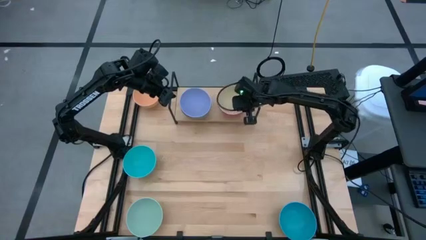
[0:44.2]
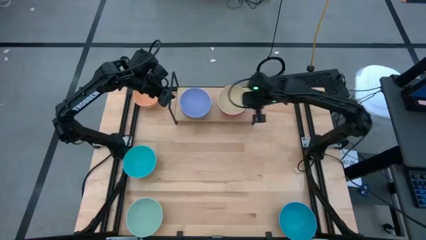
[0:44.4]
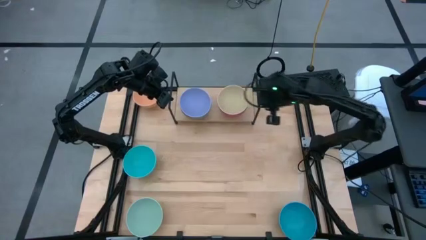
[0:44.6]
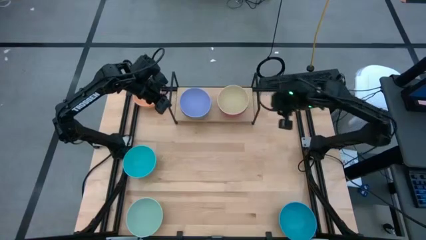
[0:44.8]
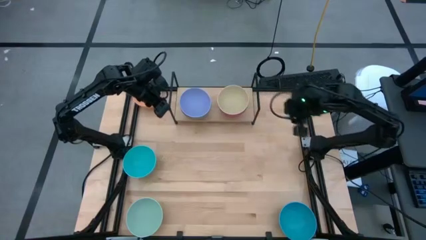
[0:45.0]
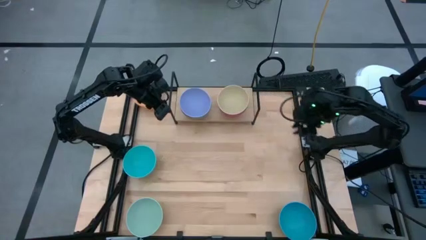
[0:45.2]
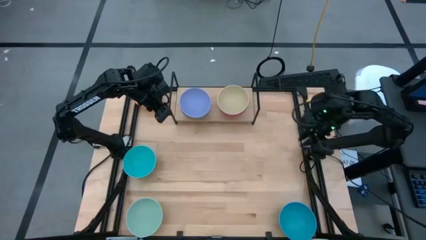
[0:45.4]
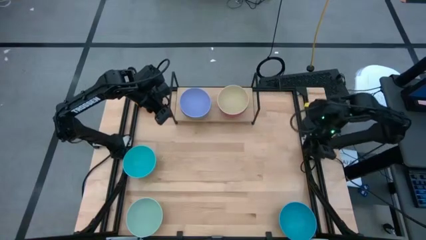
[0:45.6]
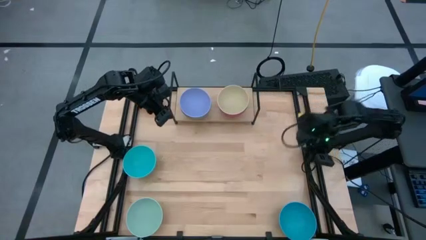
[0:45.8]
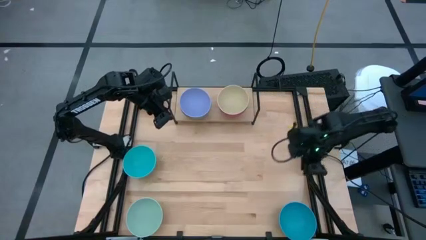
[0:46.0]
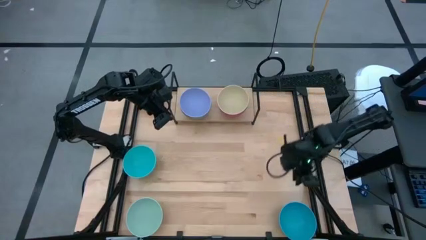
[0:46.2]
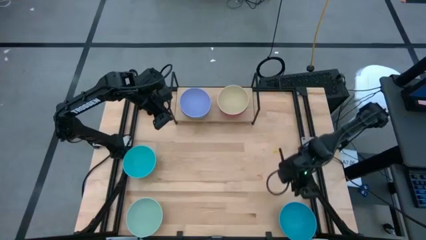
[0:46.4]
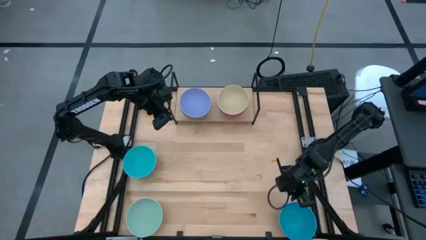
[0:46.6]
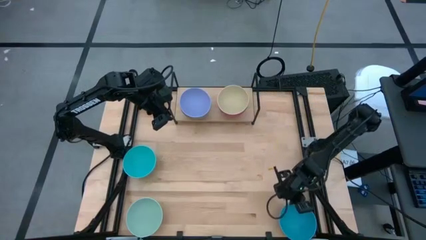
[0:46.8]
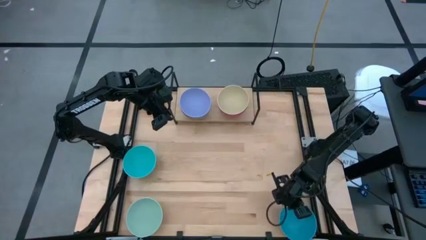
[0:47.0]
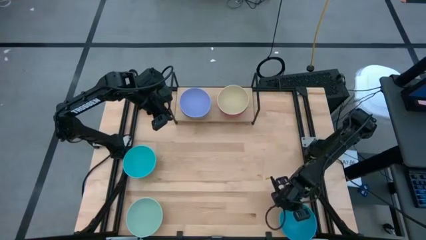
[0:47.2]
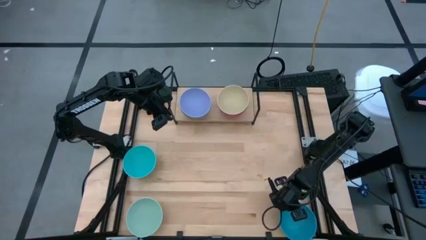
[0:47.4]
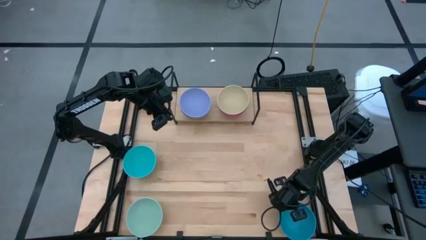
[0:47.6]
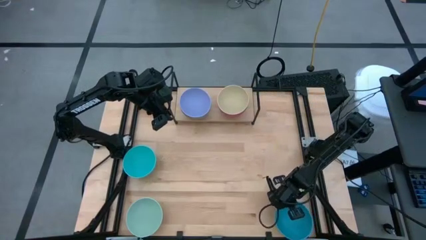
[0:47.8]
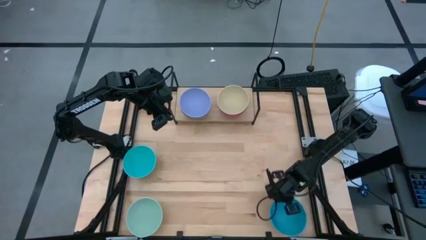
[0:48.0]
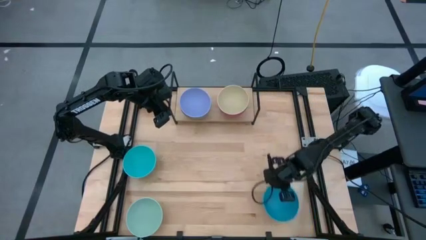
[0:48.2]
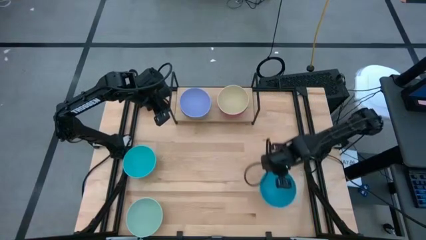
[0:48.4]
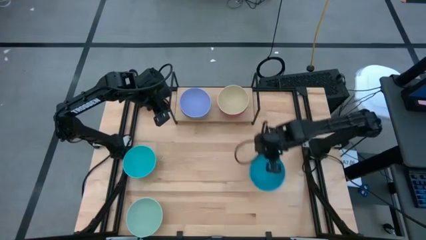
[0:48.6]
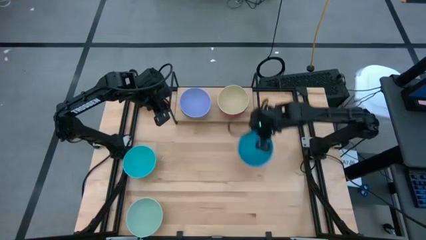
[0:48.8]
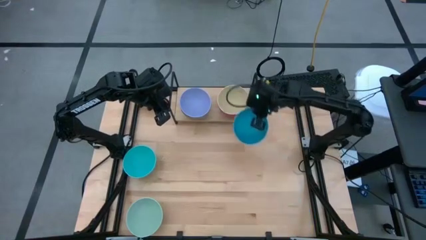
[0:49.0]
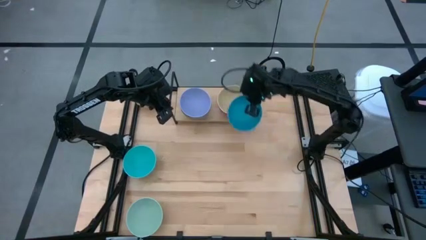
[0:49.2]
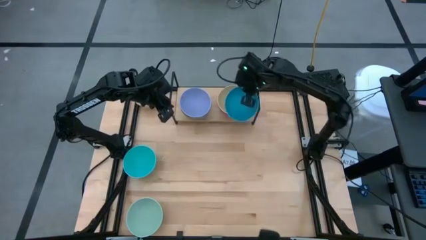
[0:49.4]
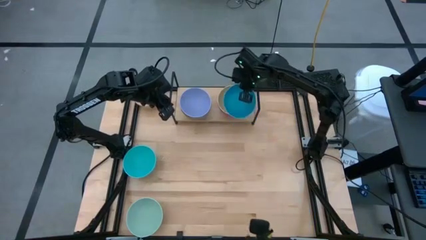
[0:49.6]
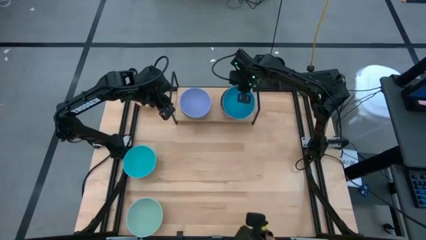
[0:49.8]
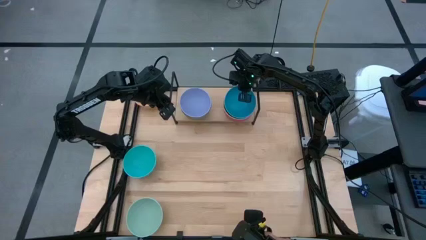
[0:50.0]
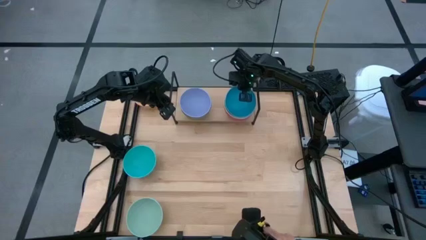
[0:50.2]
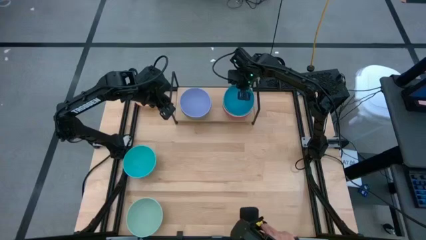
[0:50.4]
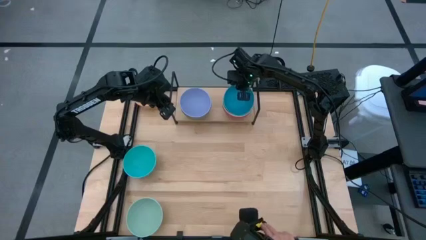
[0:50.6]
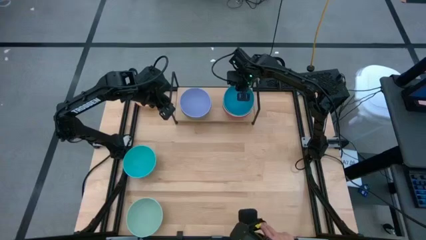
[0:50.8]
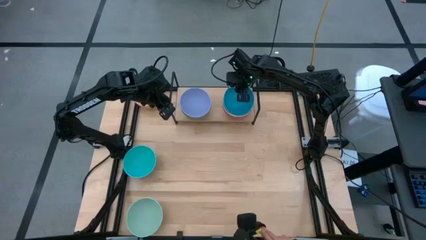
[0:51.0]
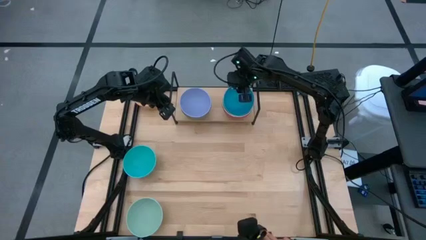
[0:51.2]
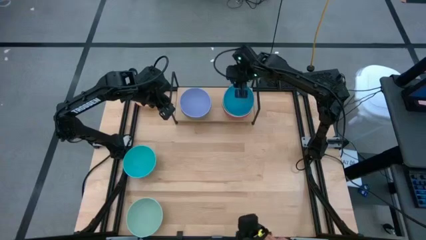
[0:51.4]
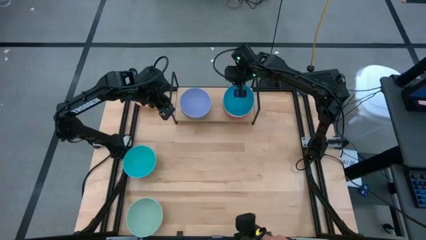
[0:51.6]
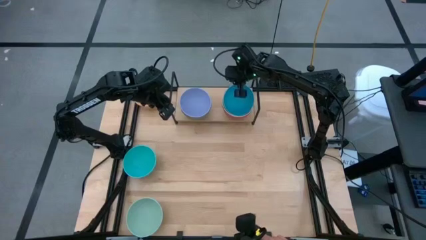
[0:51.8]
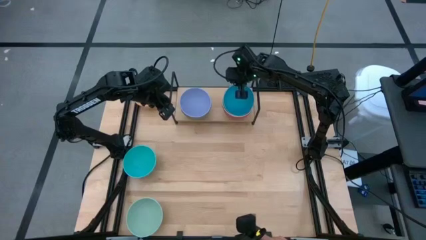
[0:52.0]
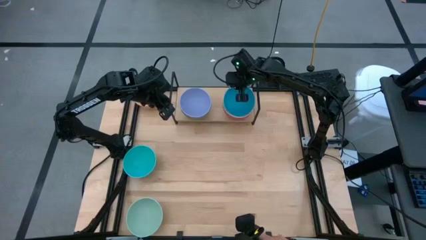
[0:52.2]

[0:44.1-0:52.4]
Task: Place and stack bowls onto a shelf
Stack the blue bowl on top of the brown bowl on the shelf

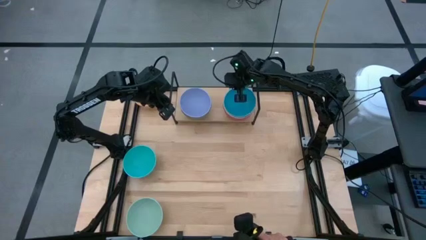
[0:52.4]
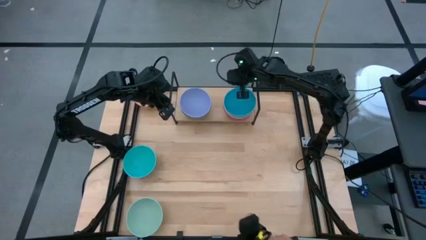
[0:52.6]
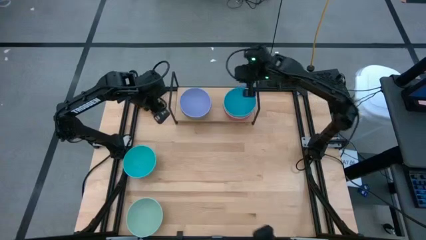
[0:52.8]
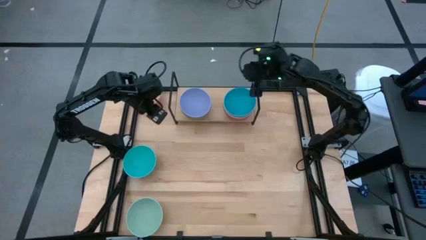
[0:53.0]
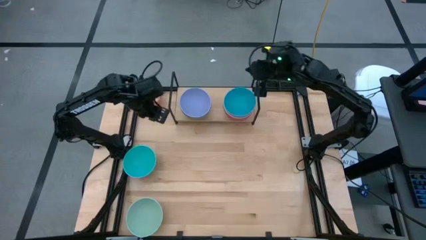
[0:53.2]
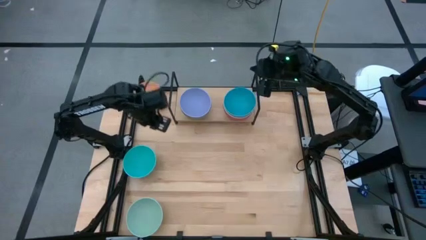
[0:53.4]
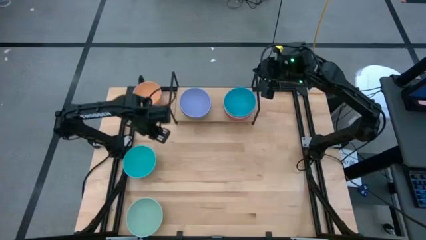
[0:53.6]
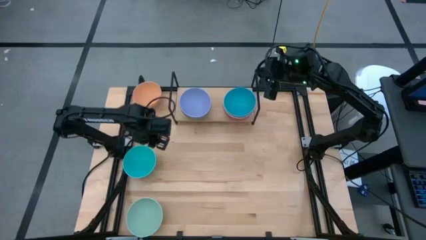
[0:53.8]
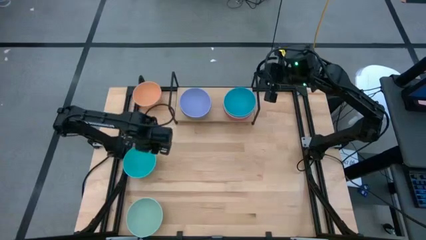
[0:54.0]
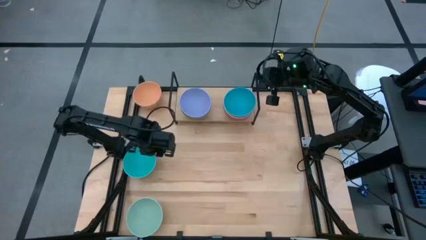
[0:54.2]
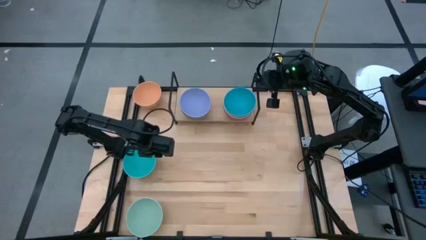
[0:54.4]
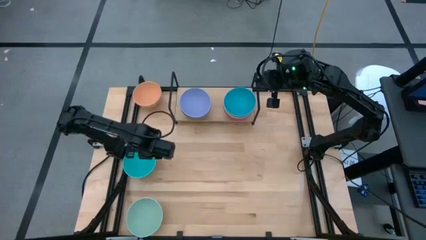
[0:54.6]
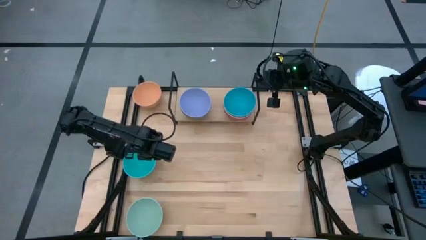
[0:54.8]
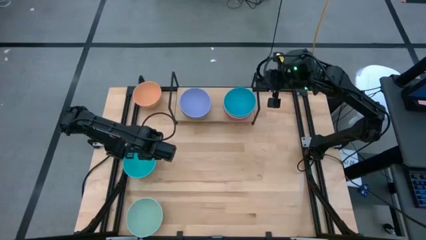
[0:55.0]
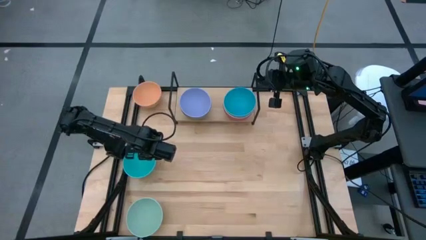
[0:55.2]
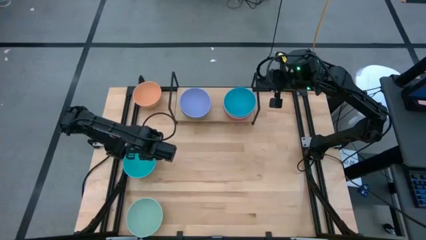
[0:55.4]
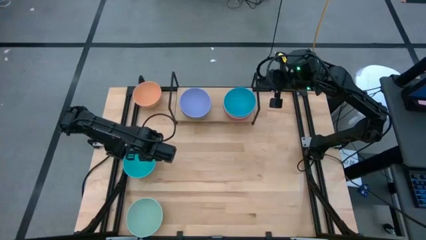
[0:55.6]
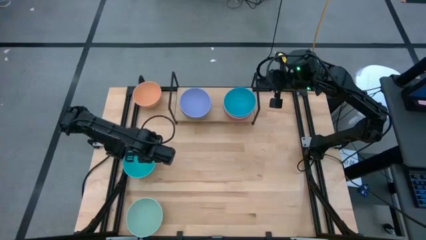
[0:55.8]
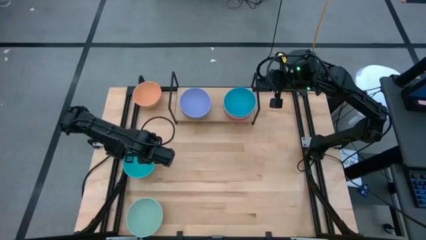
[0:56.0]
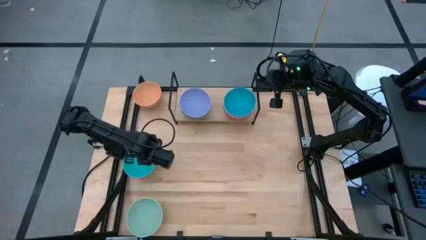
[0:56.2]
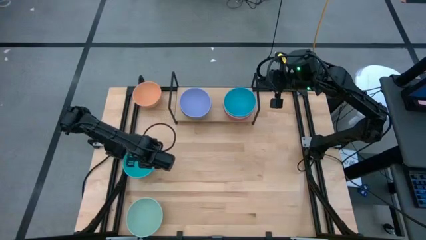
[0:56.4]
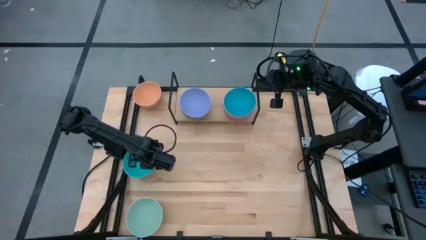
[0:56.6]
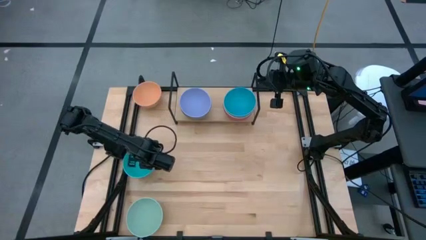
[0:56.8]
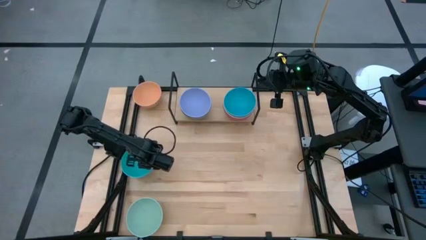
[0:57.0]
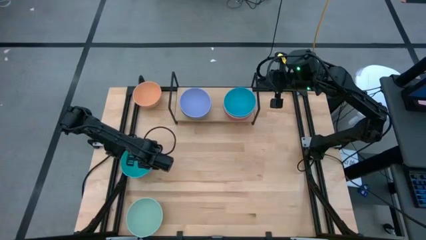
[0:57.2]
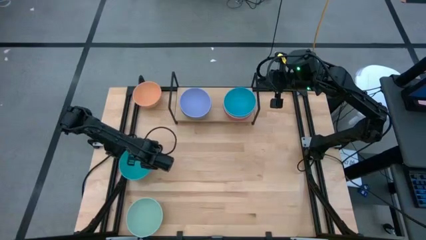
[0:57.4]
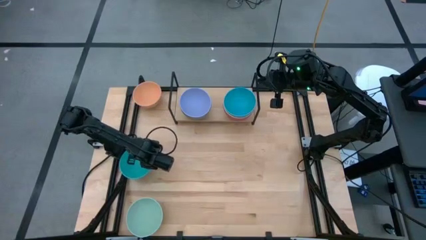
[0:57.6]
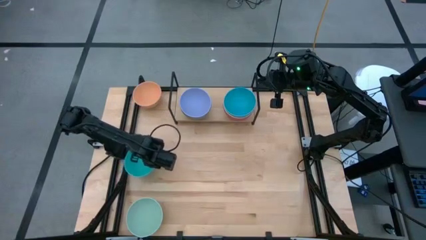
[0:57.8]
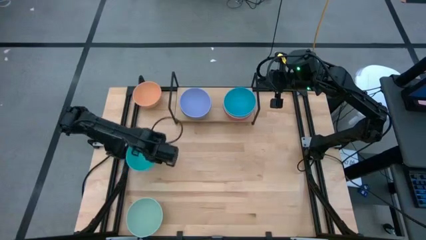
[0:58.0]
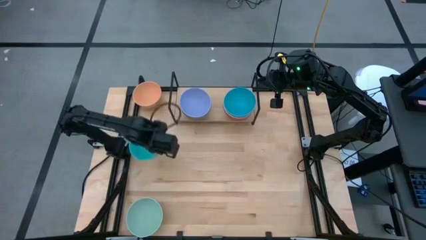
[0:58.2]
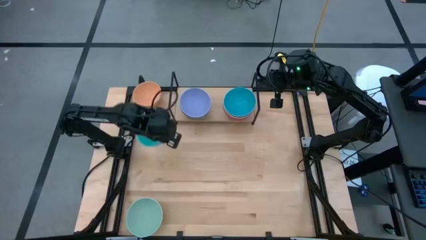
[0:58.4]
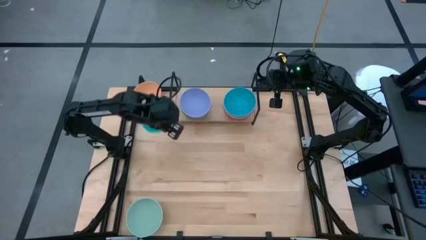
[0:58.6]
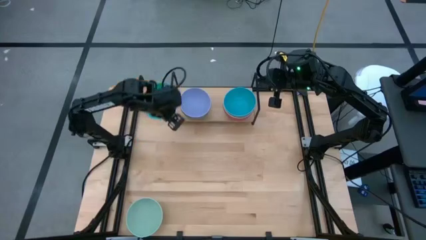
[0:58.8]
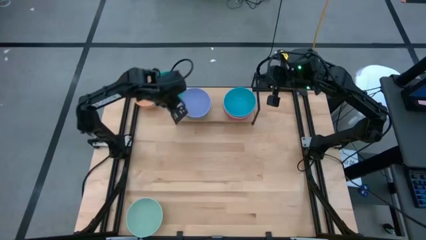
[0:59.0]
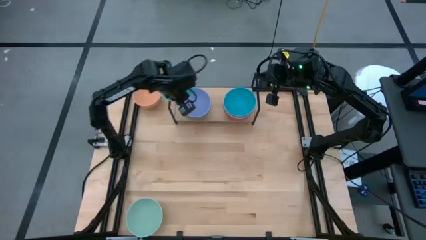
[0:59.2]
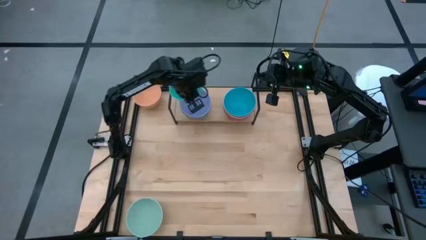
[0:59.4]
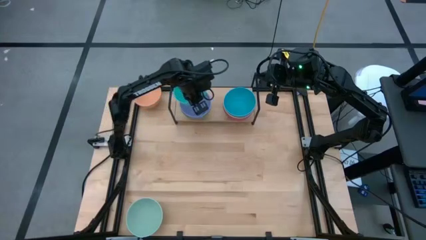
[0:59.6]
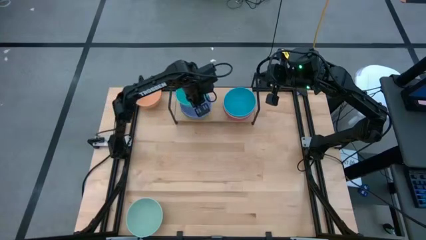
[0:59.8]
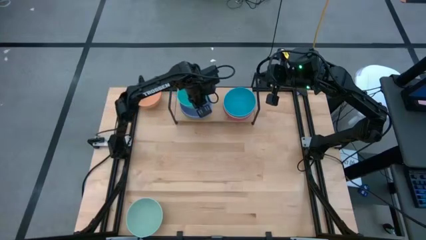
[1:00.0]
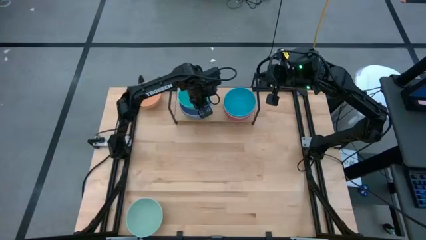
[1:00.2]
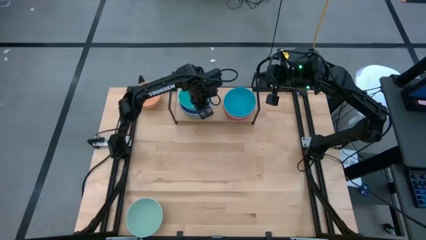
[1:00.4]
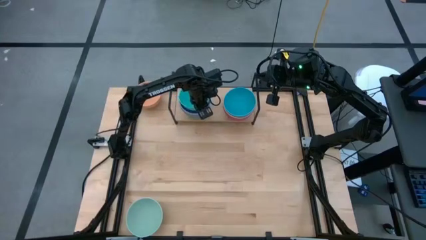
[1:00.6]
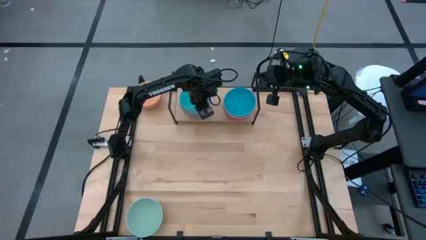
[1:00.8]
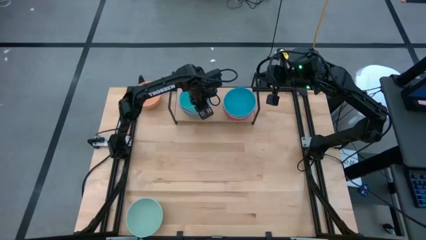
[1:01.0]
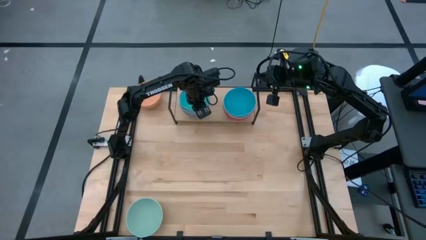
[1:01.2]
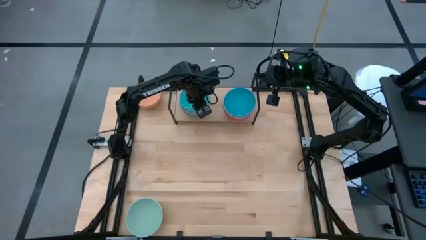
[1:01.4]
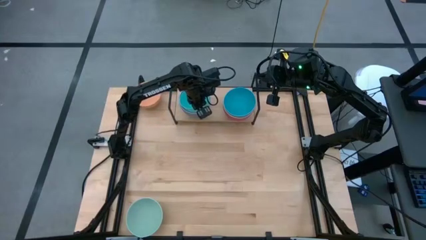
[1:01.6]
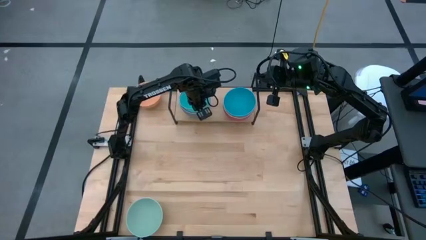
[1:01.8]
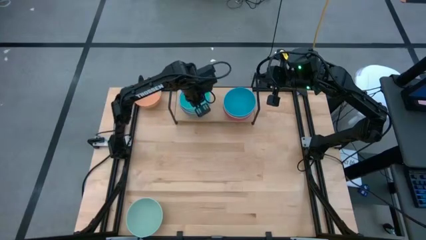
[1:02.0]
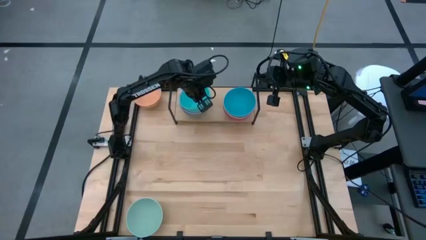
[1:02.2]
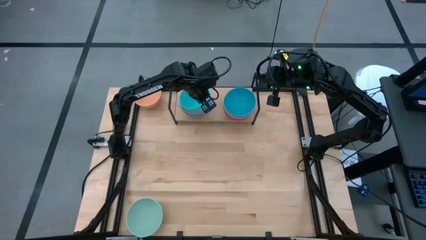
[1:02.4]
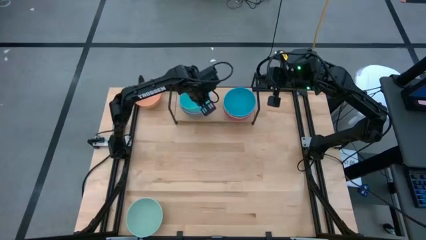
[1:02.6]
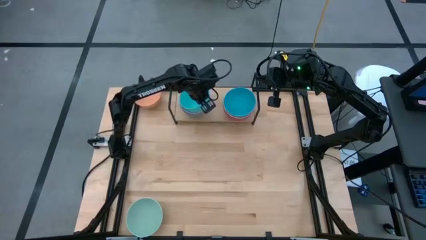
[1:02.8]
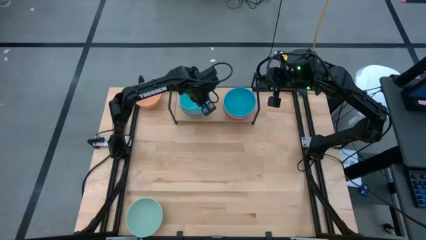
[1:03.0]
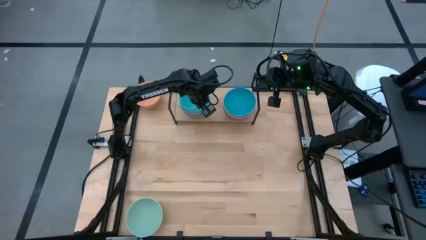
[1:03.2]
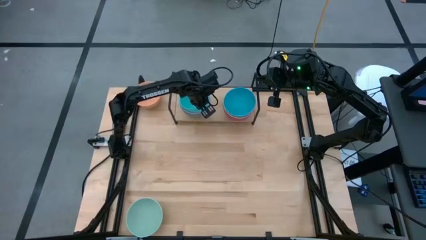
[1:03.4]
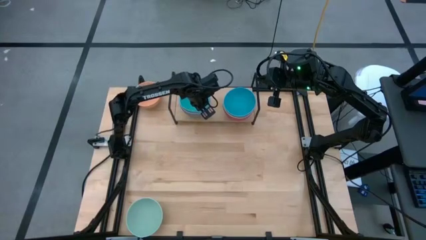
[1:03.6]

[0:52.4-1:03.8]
Stack the light blue bowl on top of the purple bowl on the shelf
